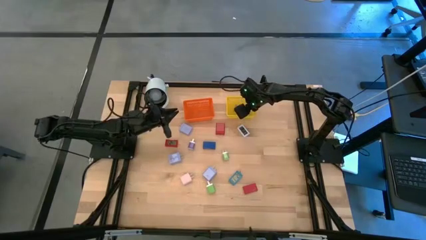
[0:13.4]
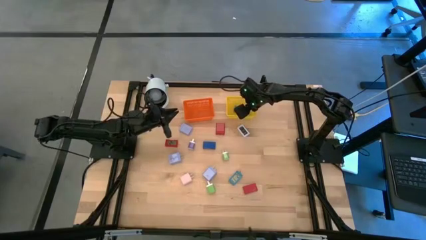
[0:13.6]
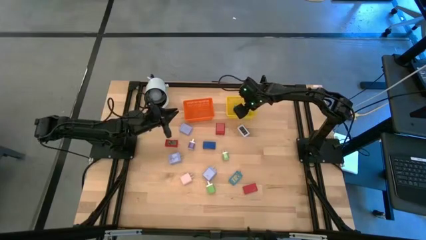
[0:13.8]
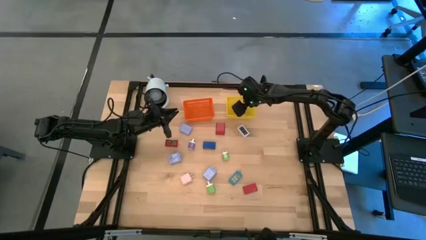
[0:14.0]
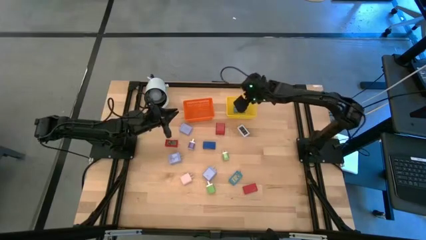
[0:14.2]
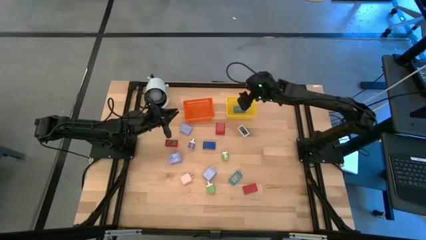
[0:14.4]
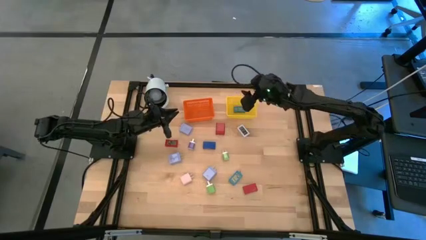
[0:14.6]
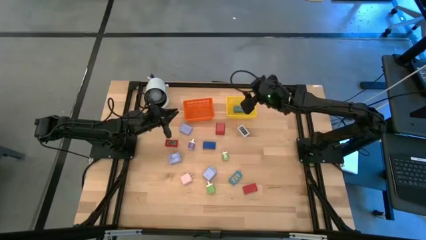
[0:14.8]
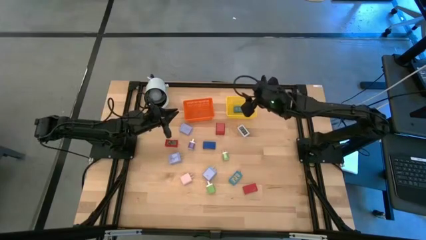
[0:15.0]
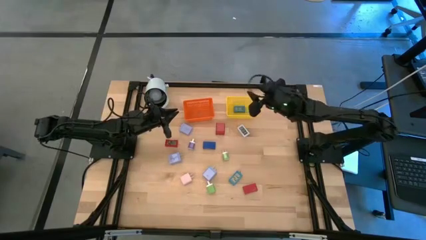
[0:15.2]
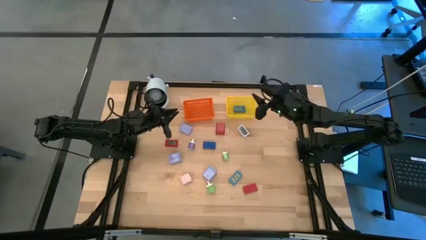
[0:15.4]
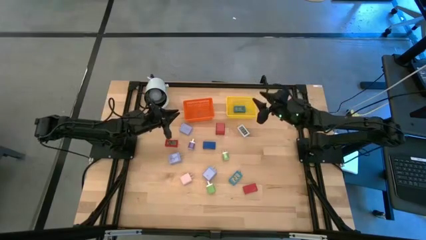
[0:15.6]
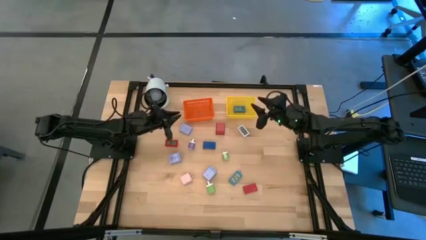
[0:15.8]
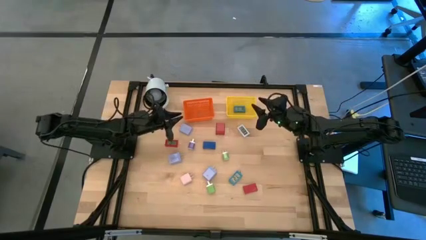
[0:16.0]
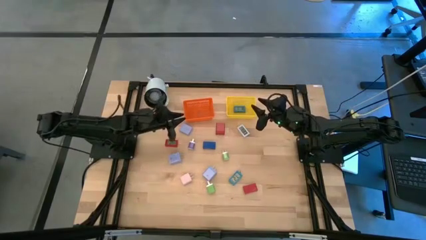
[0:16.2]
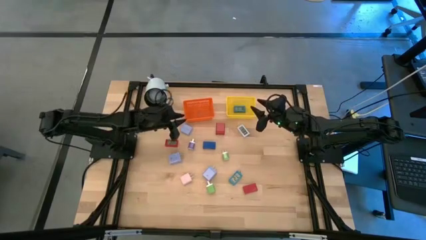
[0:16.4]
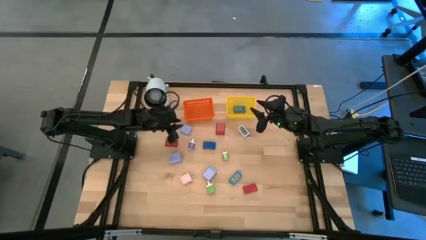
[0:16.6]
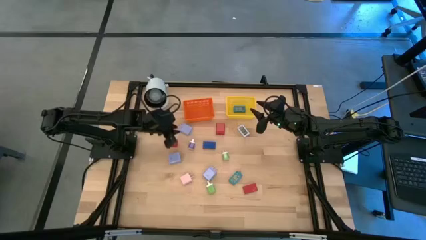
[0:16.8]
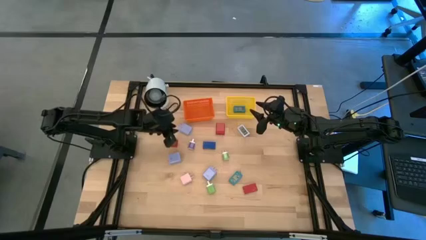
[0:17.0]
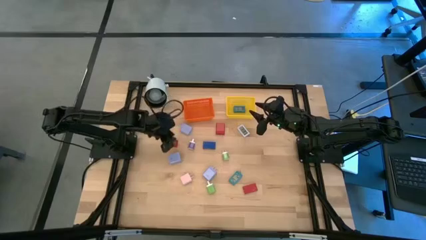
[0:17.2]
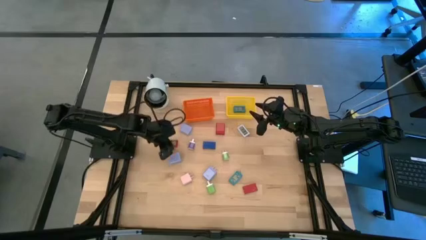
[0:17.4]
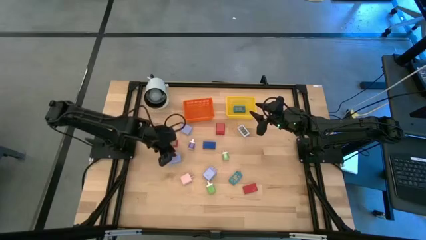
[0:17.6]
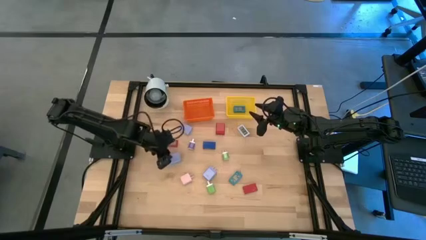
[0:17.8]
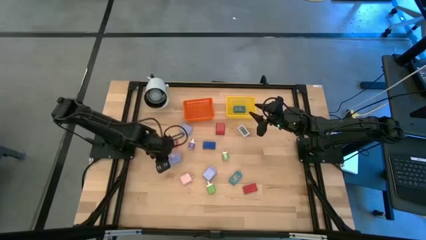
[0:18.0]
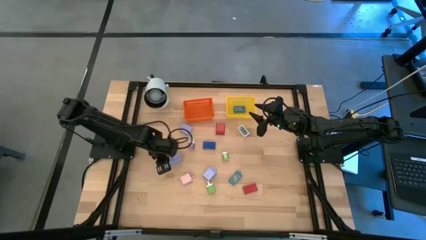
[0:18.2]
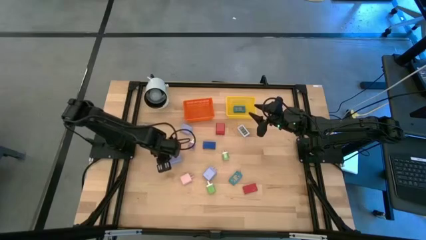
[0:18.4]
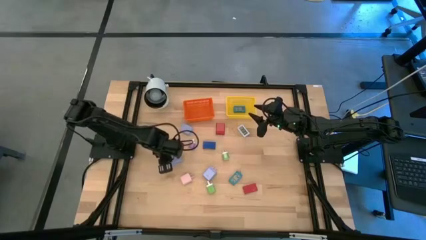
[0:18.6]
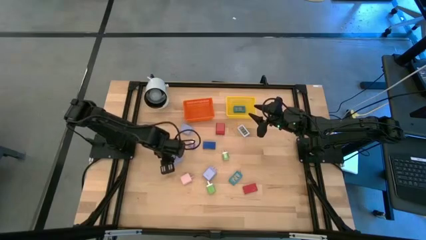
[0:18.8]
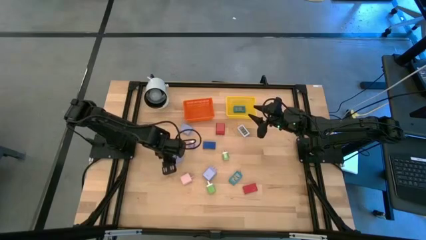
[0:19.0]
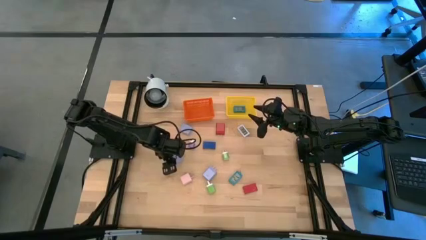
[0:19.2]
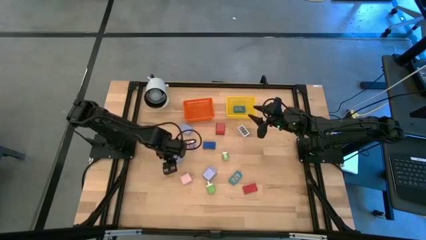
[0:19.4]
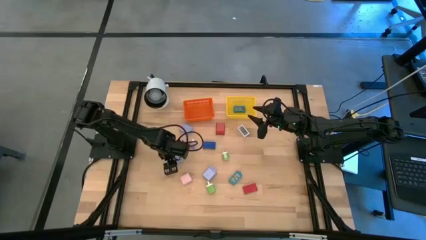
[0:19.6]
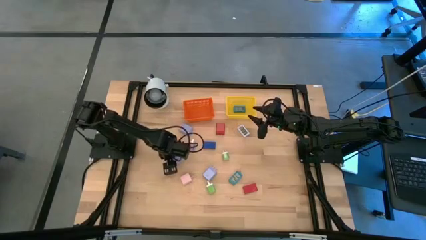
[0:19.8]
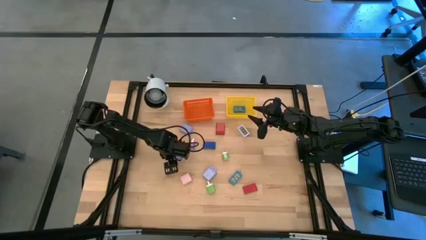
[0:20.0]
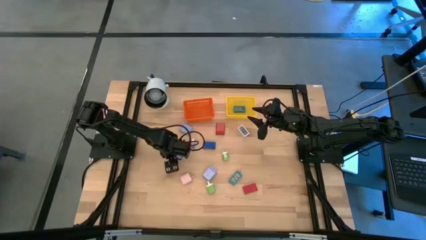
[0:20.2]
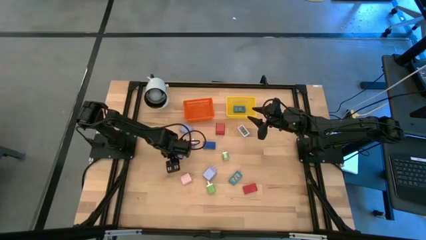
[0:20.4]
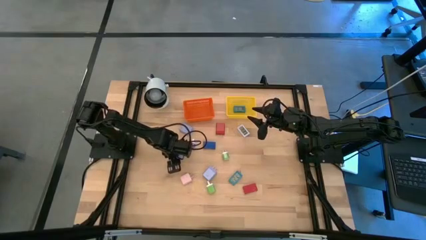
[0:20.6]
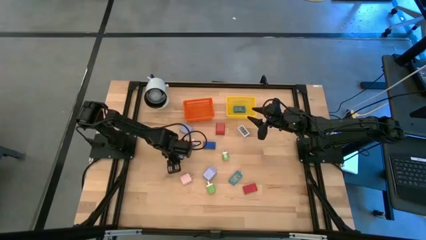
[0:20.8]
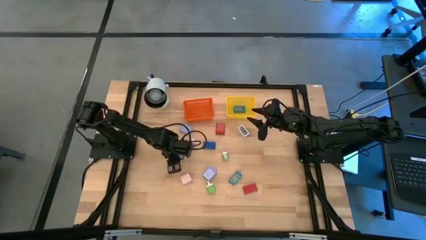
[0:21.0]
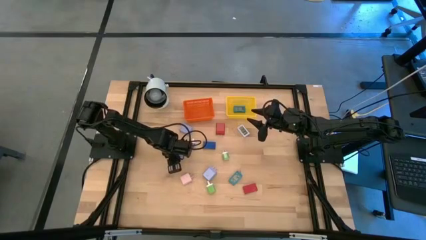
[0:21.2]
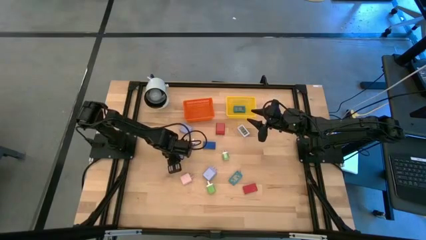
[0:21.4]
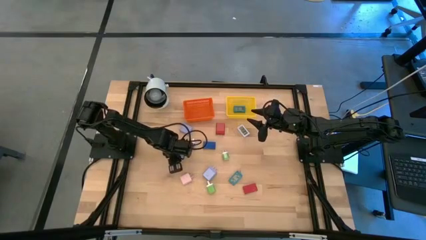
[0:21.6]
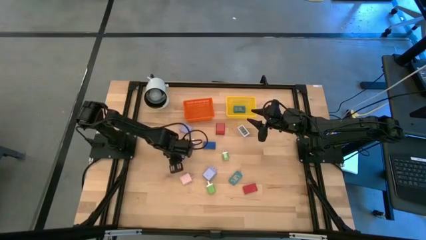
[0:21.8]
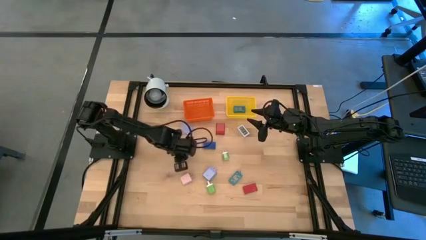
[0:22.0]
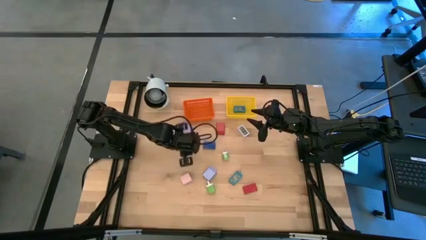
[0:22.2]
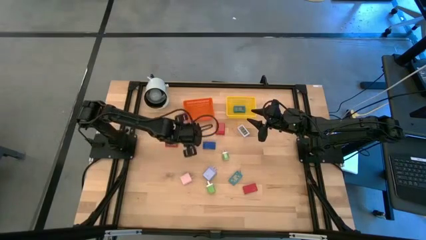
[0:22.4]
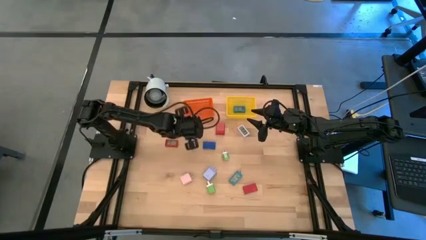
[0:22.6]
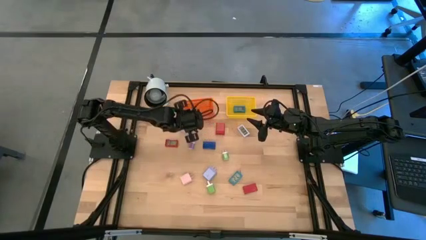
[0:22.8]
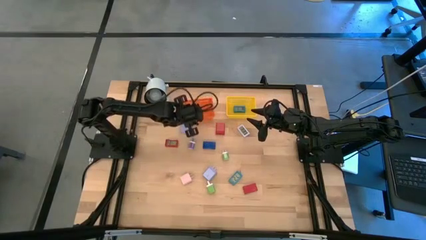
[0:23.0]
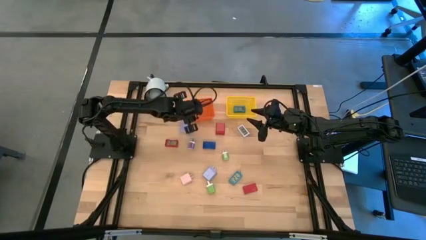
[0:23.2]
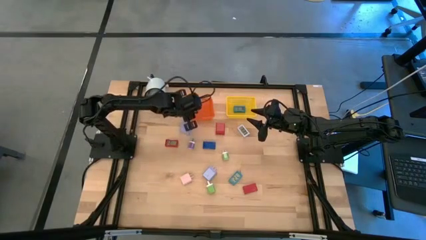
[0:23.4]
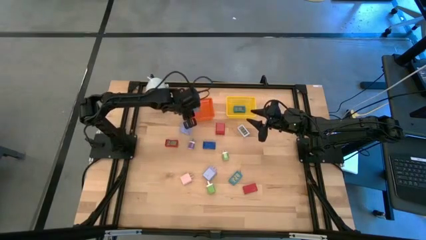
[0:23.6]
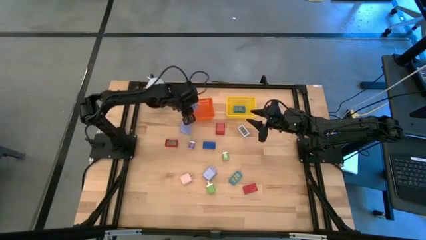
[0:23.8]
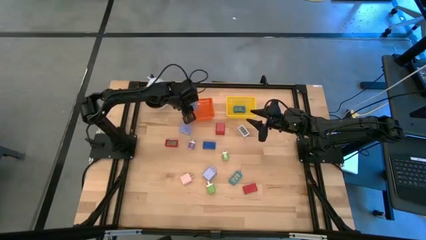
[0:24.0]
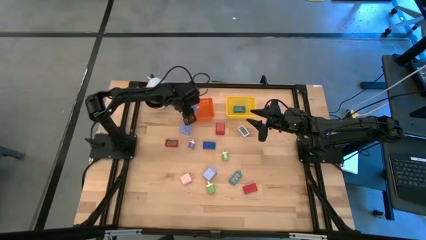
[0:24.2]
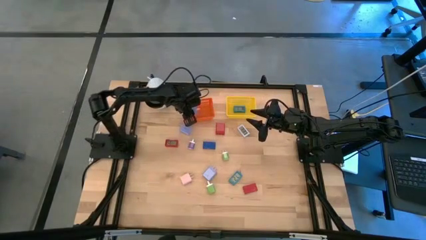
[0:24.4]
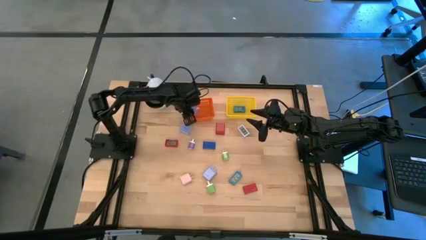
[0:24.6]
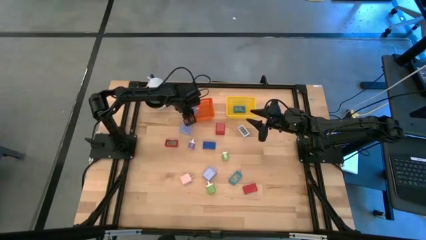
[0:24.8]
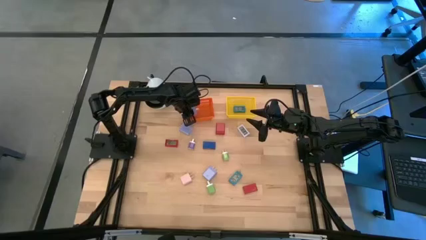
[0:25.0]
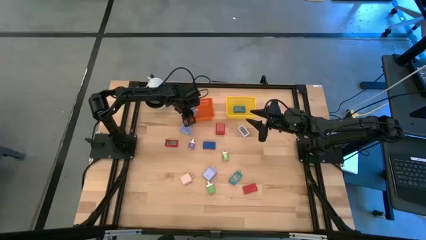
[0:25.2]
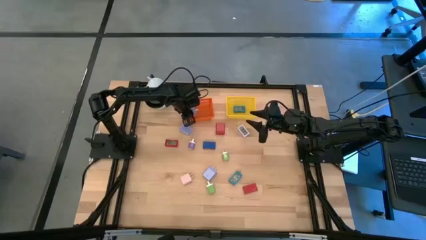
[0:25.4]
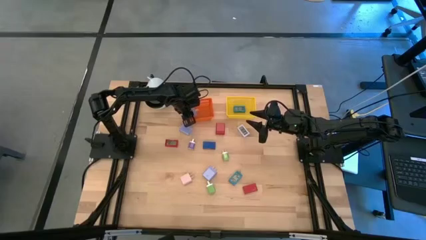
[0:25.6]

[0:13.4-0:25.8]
Task: Pick & Place Office items
Put the middle purple charger adapter into the orange bin
